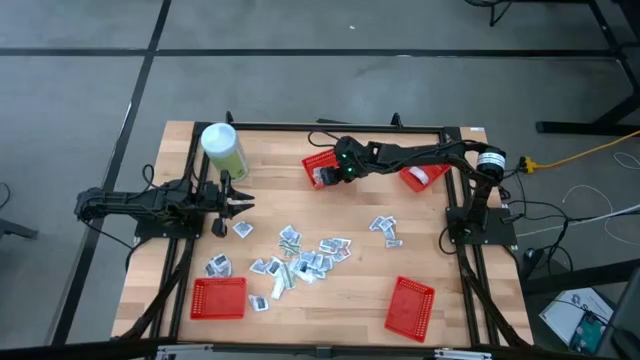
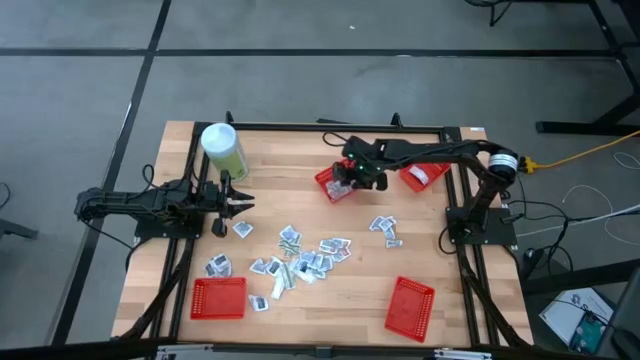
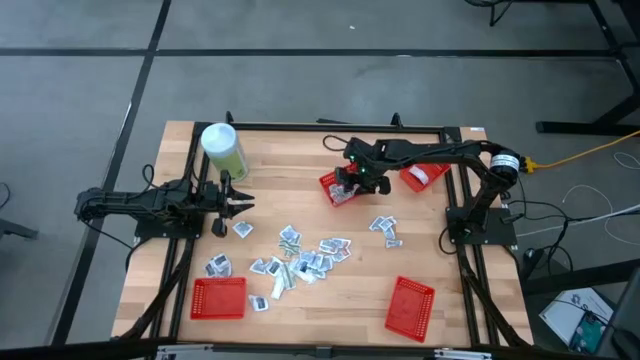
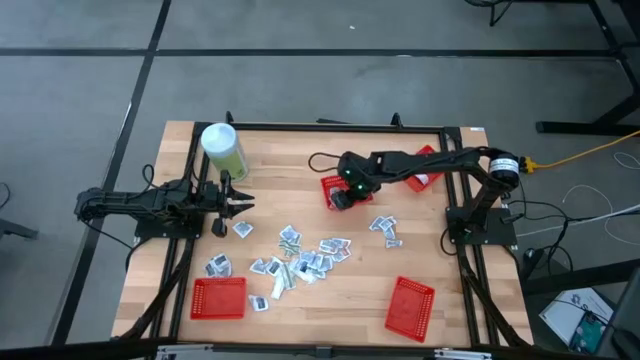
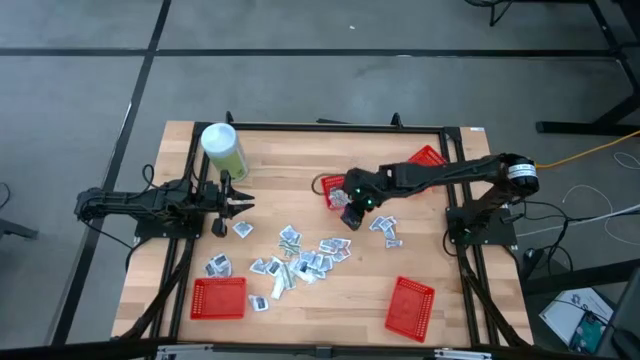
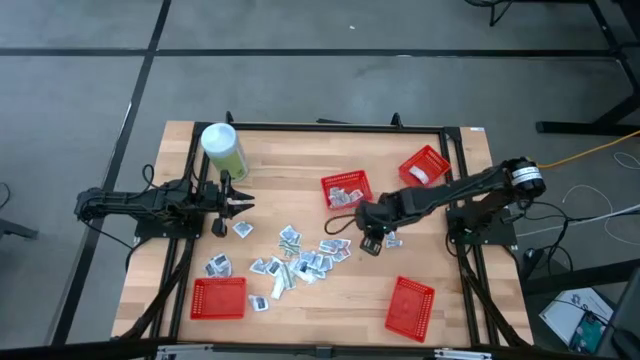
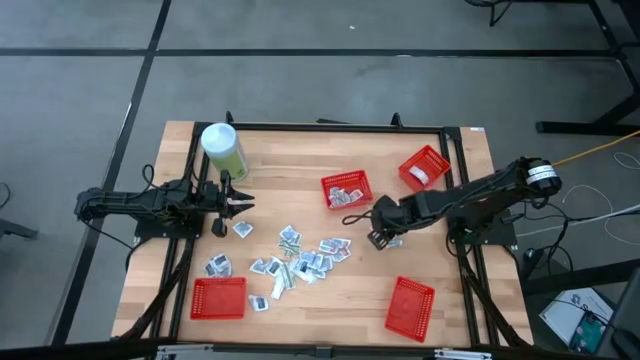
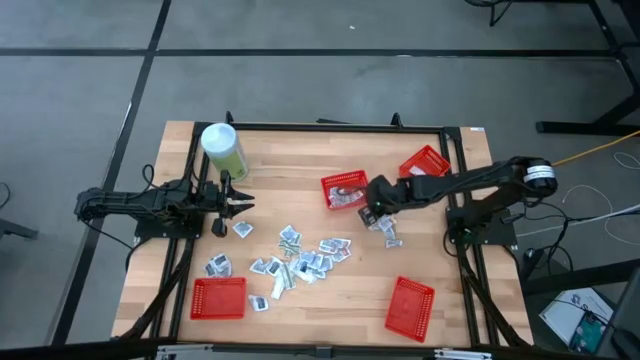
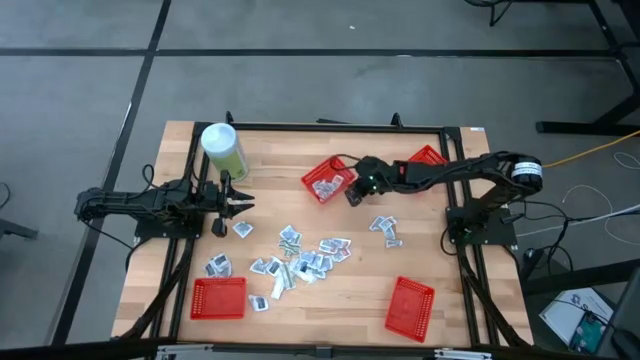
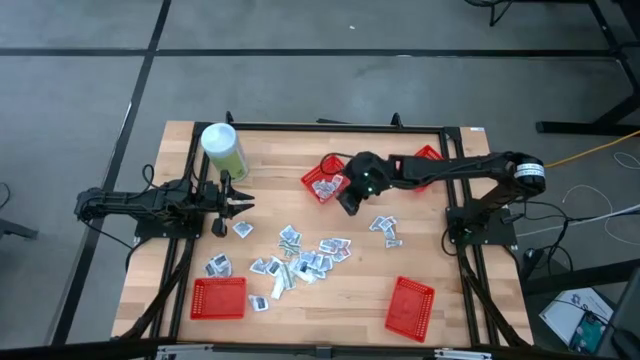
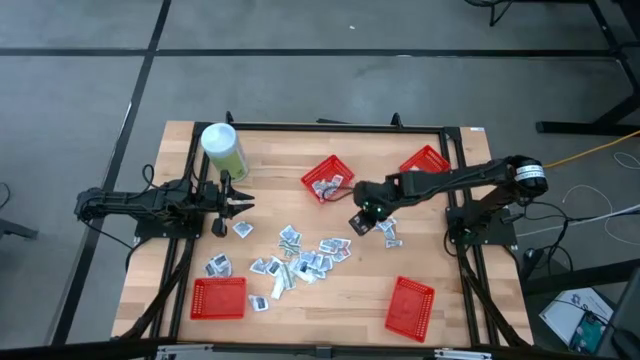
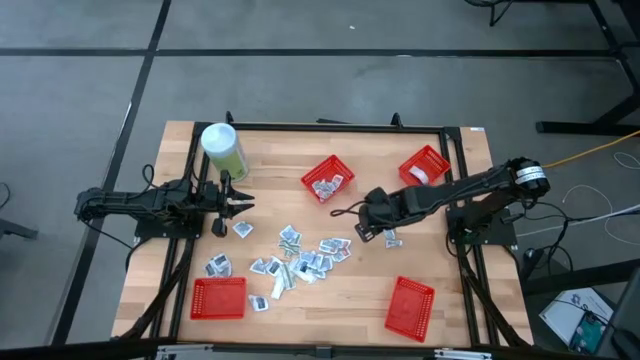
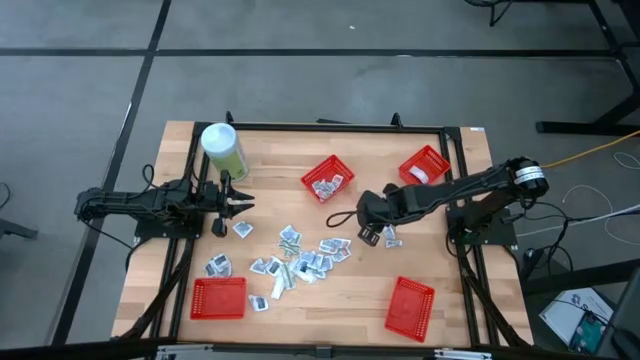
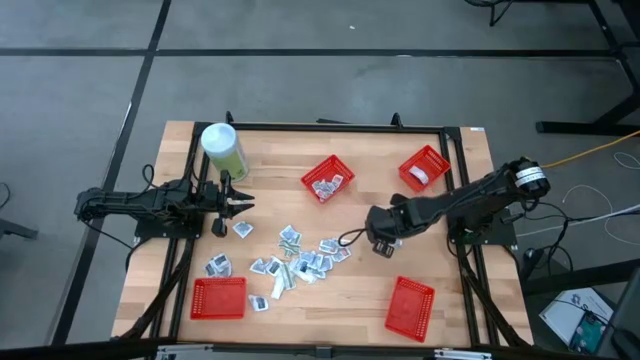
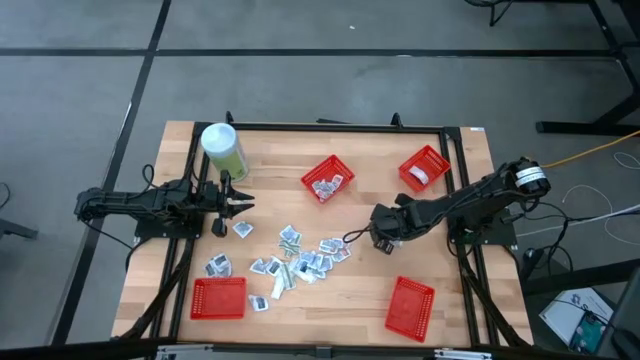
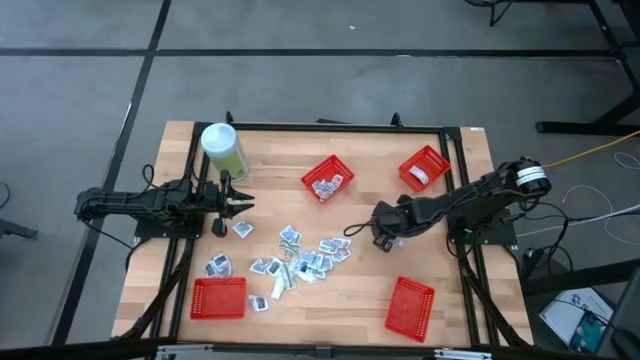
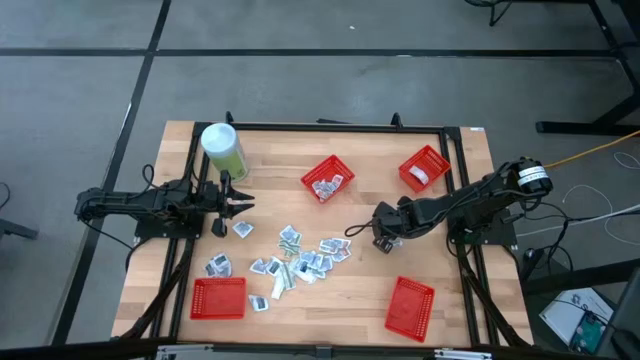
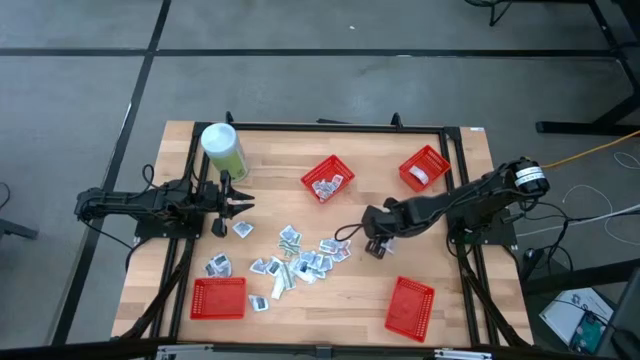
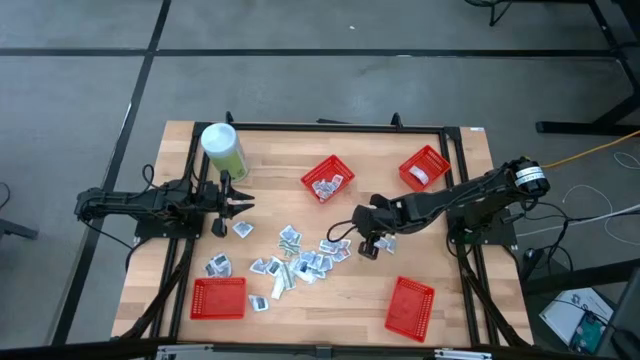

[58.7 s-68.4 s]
Task: Pick & Place First Aid Supplies
Put the orange ointment pack into the red container

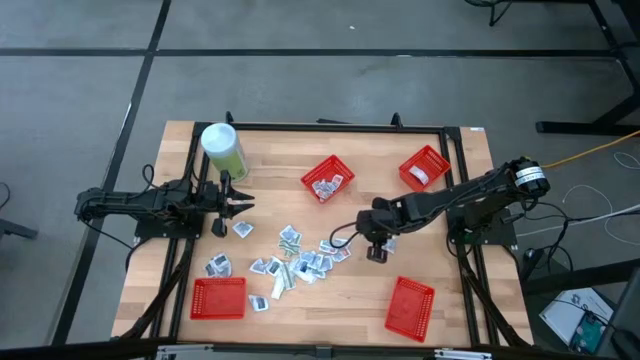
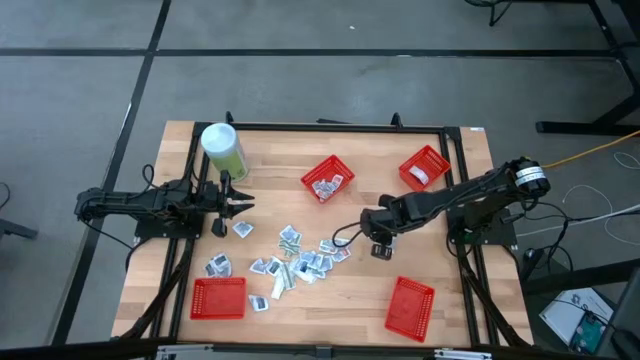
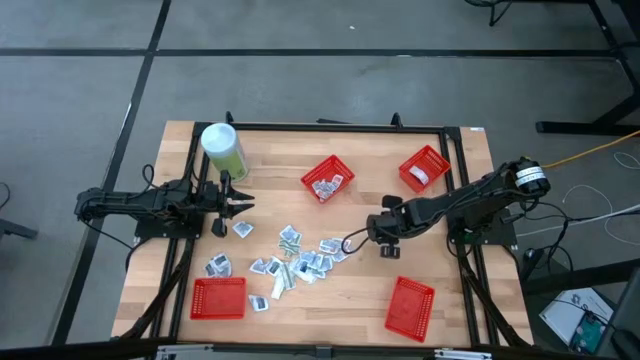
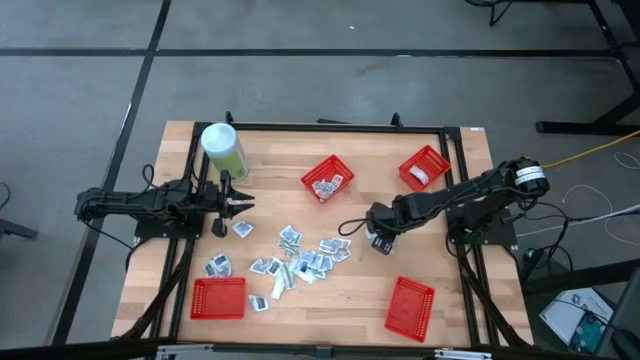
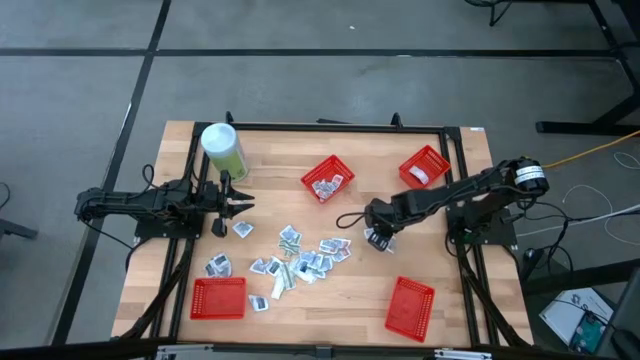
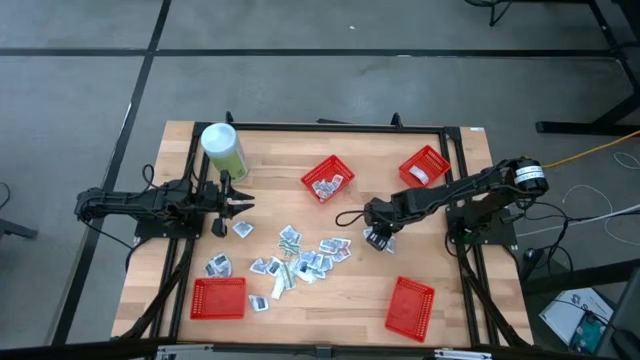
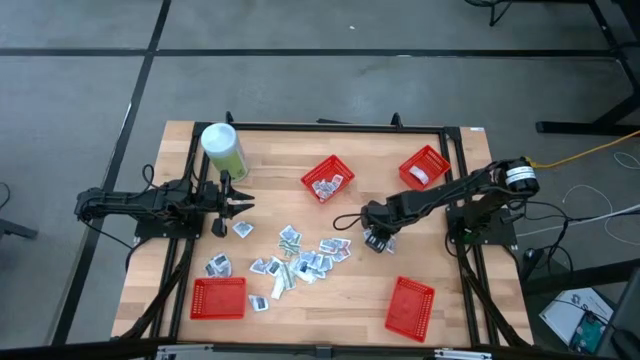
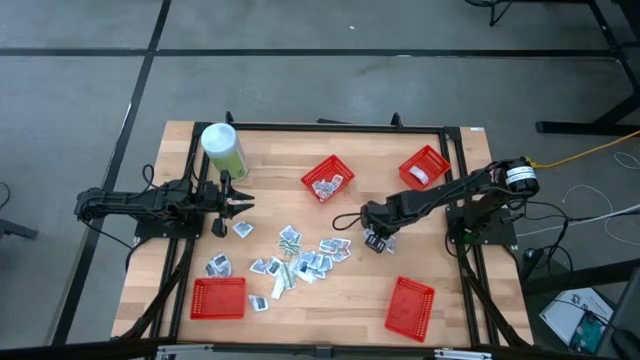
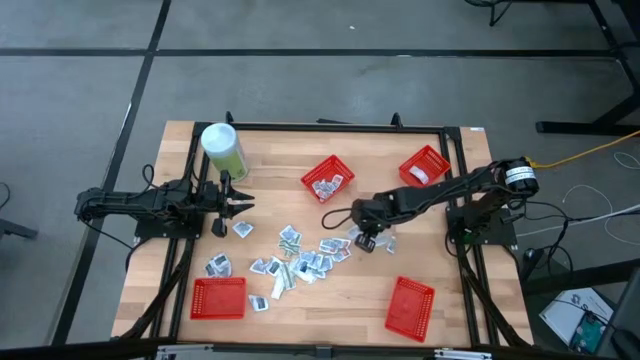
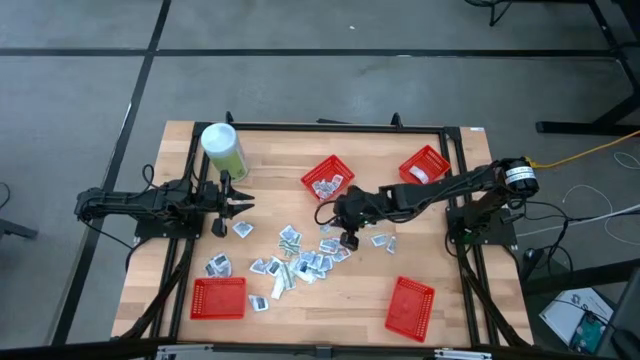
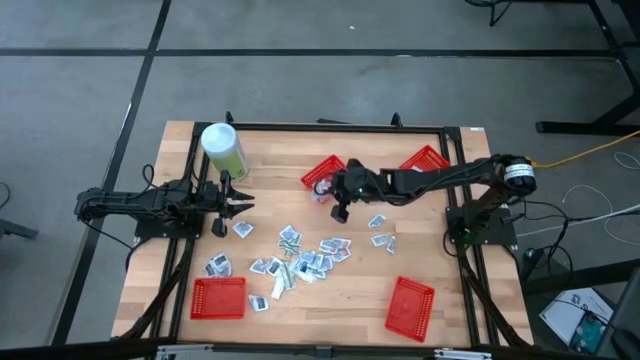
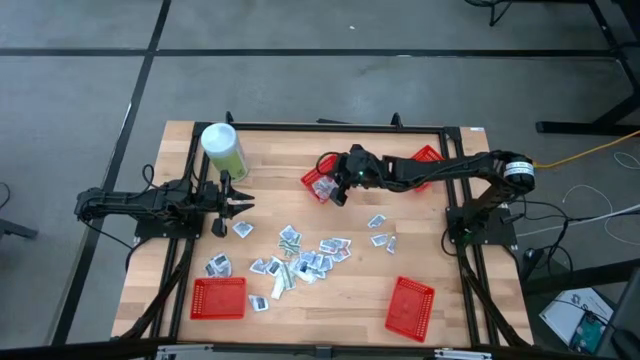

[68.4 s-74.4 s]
Put the orange ointment pack into the red container

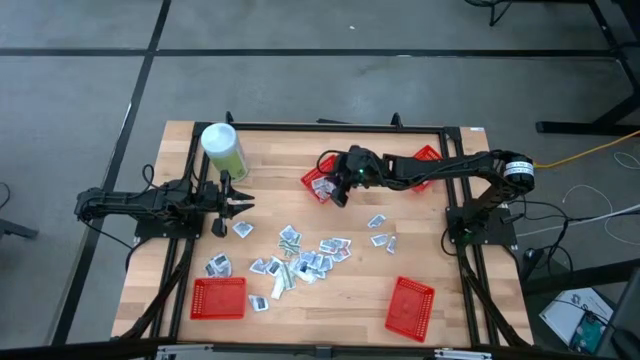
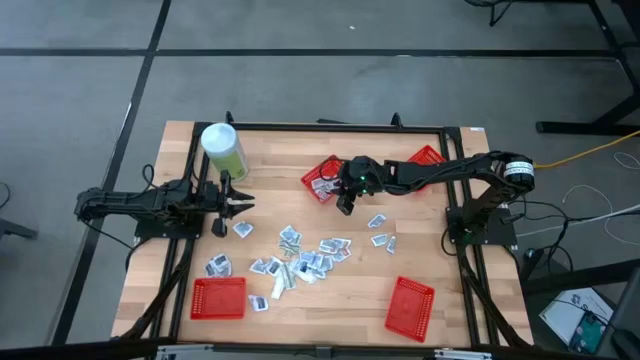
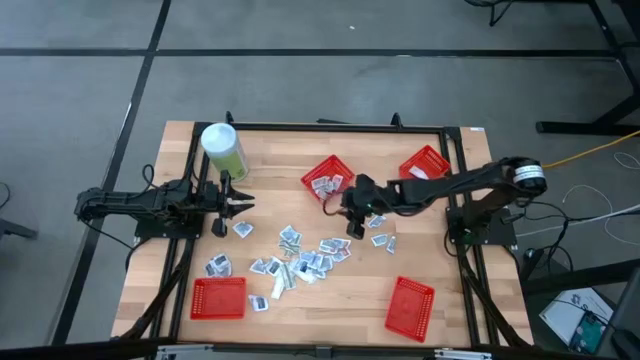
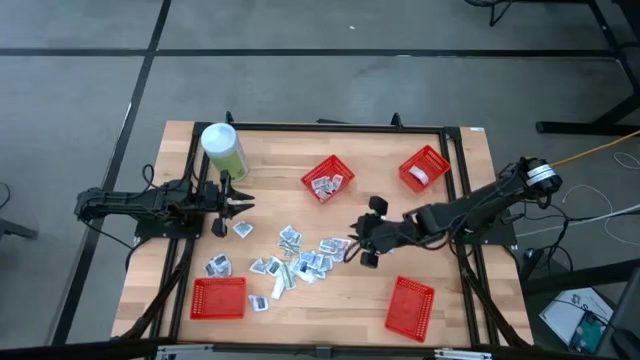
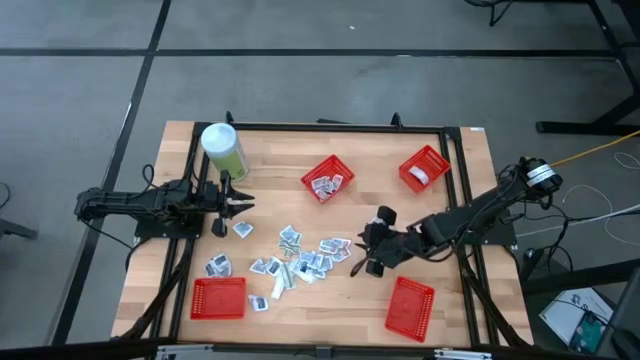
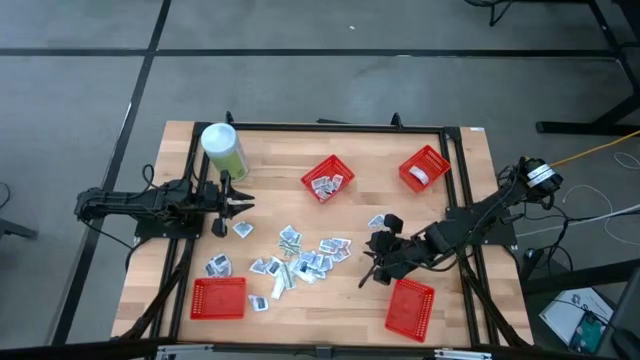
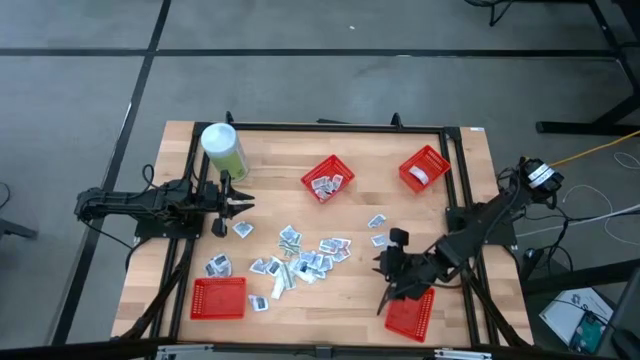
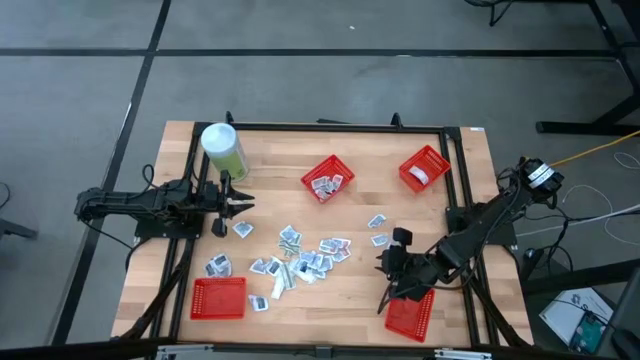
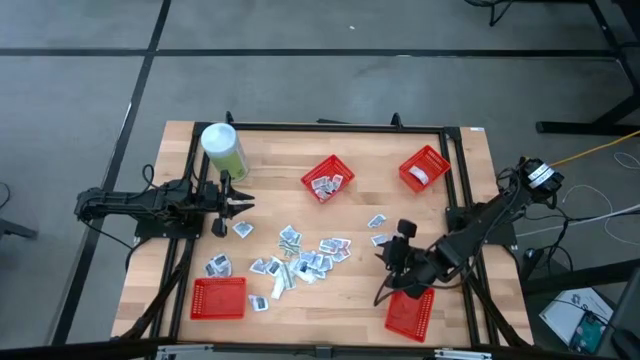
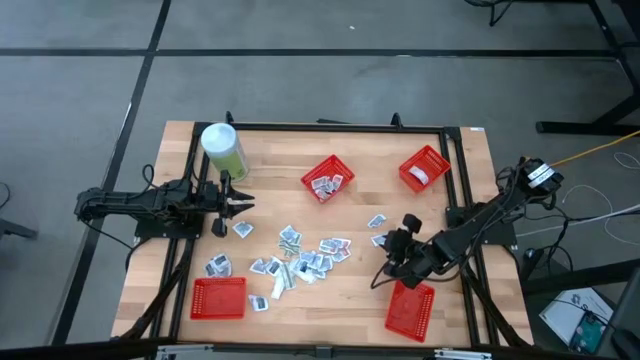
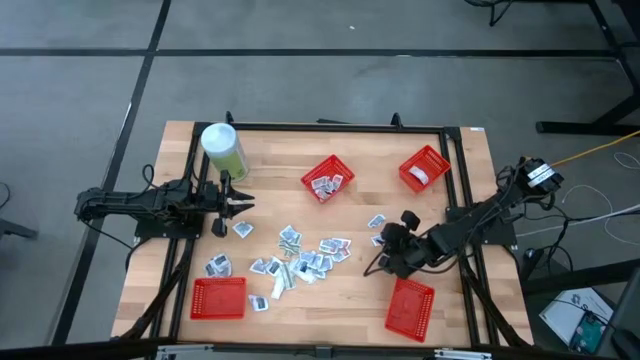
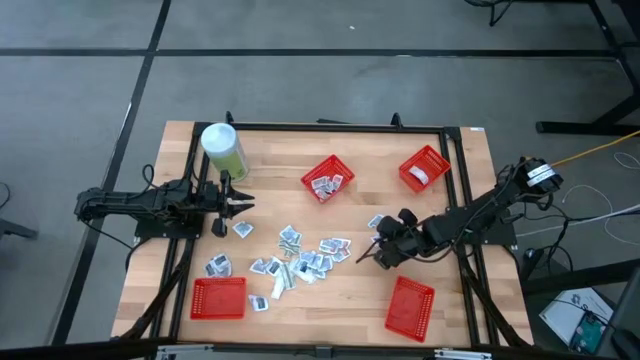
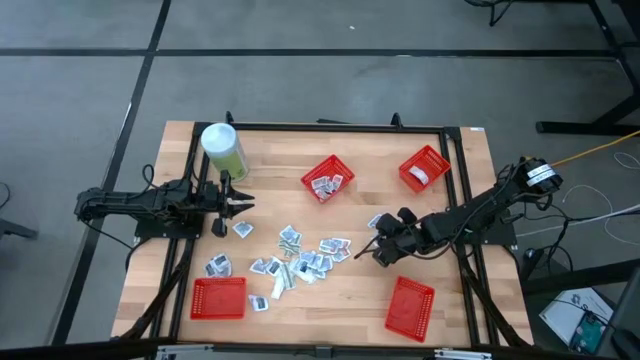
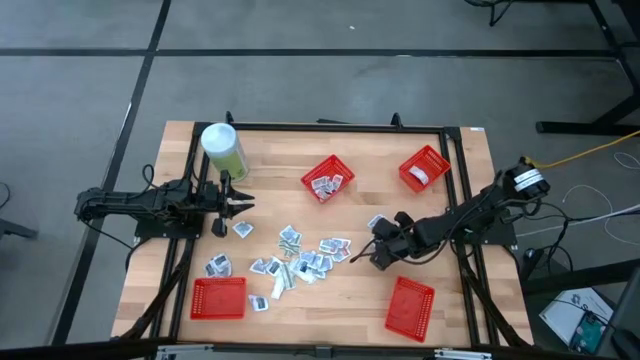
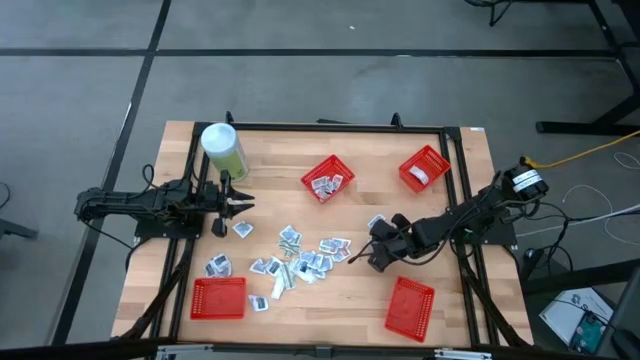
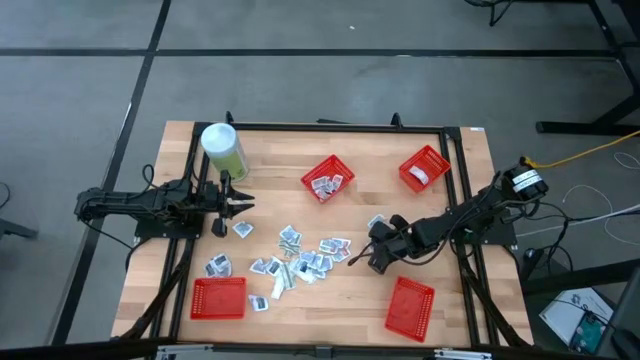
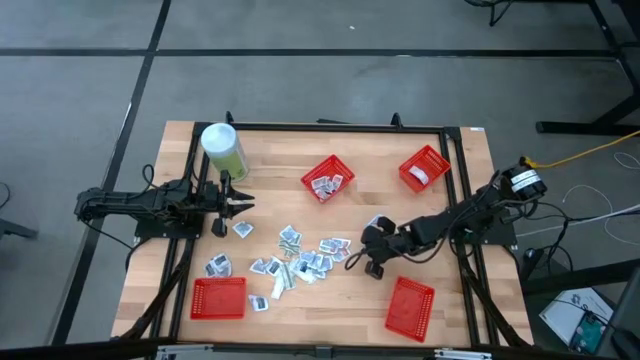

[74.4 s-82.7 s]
Put the orange ointment pack into the red container
